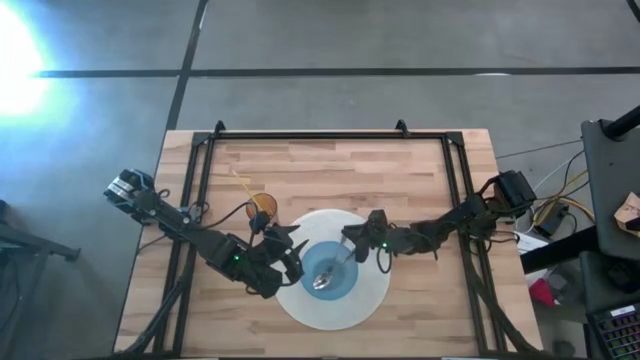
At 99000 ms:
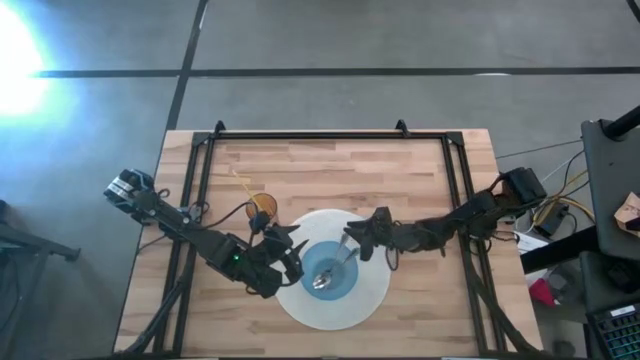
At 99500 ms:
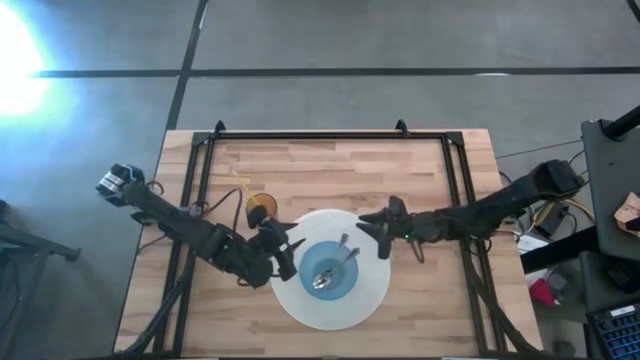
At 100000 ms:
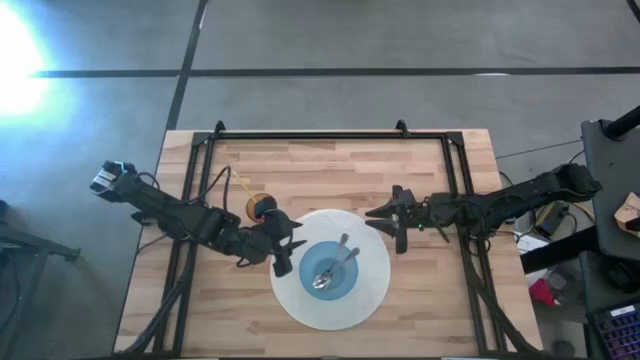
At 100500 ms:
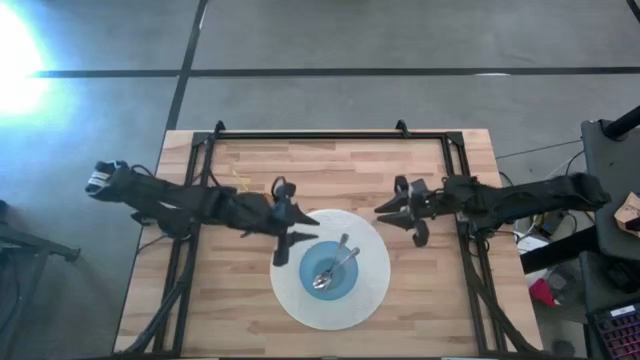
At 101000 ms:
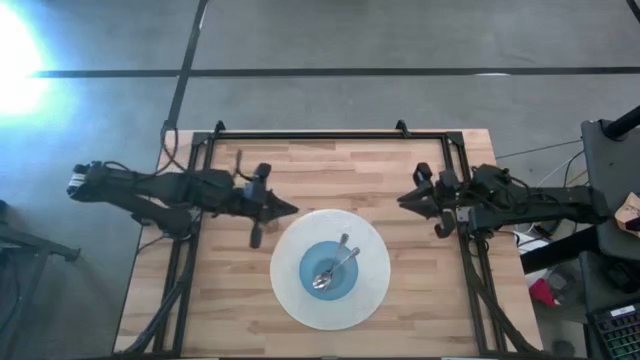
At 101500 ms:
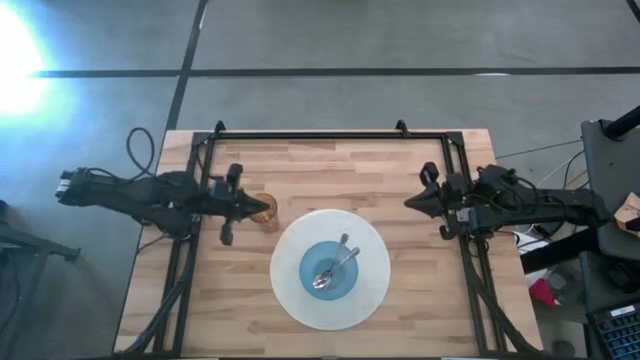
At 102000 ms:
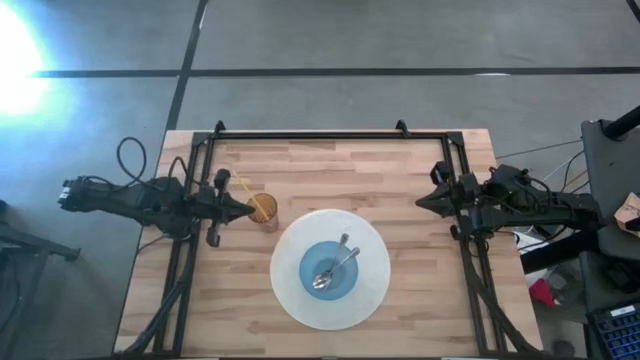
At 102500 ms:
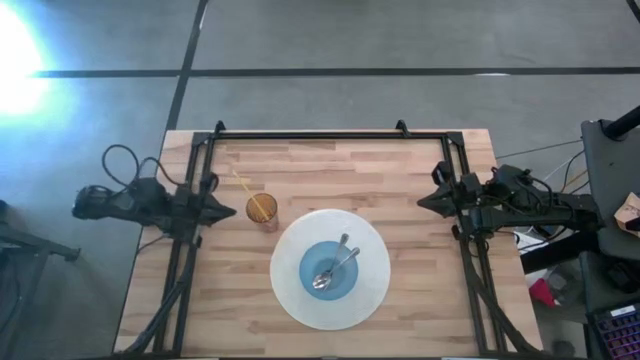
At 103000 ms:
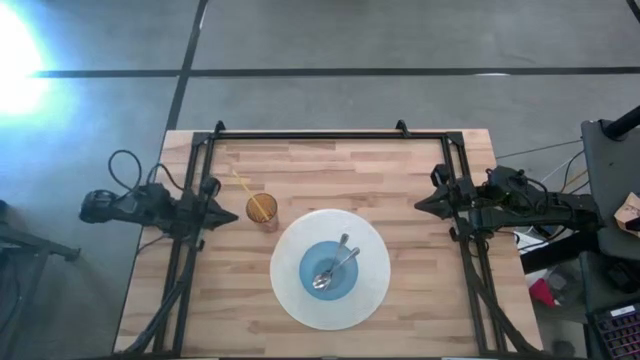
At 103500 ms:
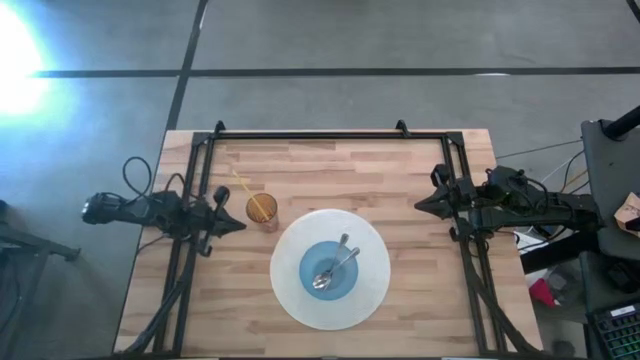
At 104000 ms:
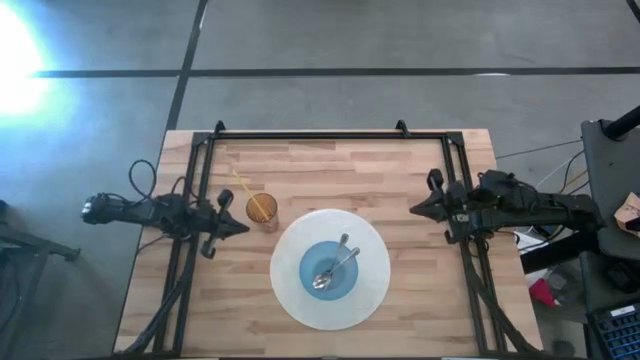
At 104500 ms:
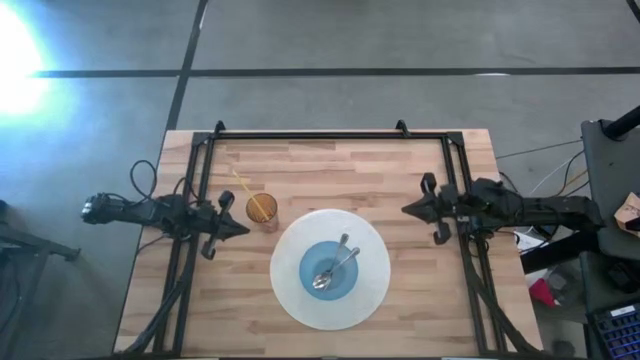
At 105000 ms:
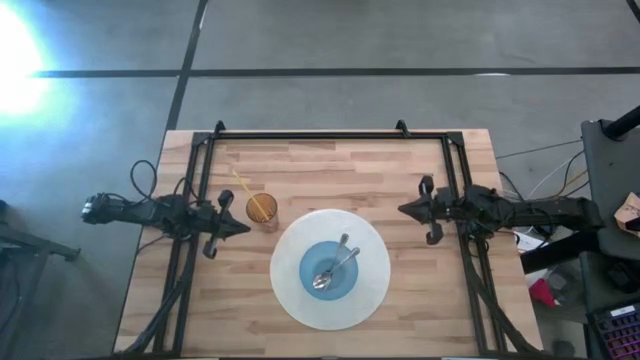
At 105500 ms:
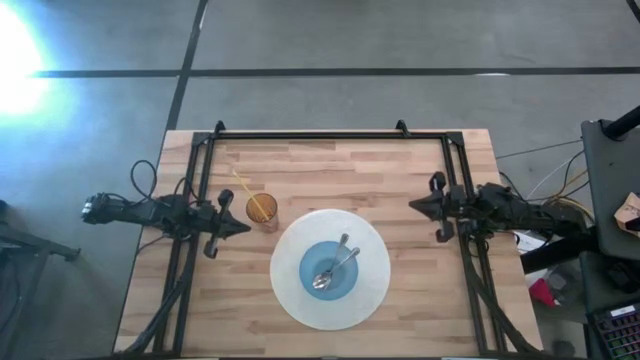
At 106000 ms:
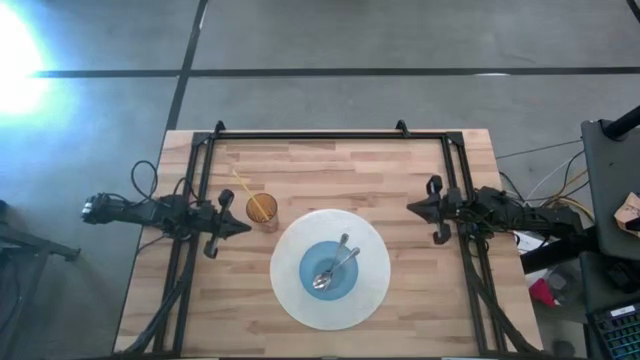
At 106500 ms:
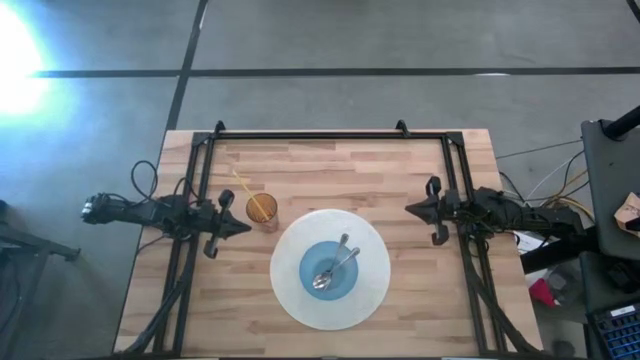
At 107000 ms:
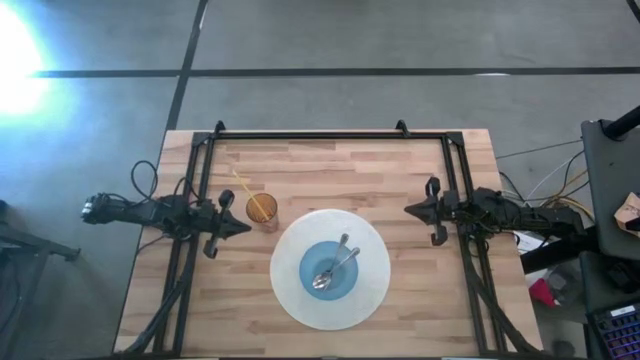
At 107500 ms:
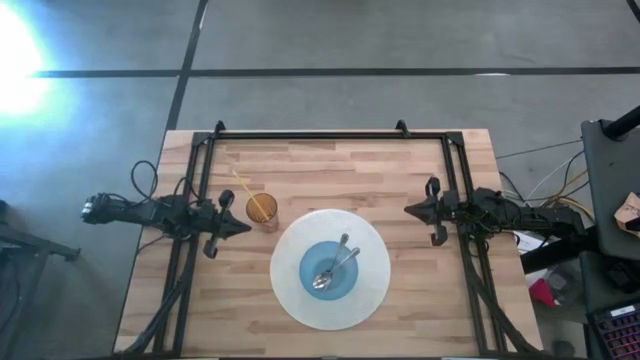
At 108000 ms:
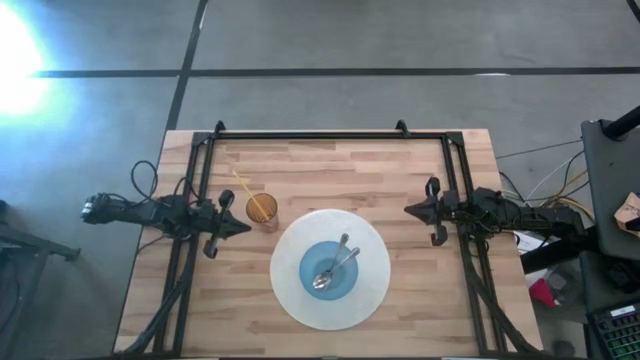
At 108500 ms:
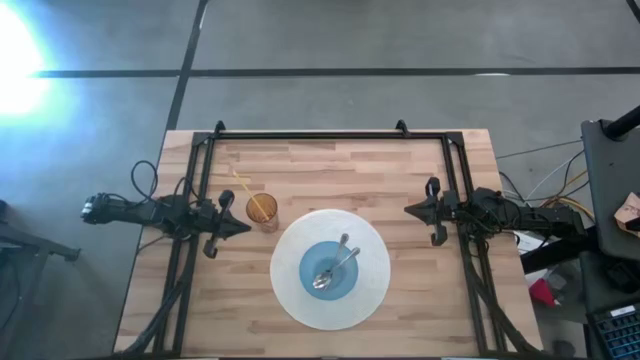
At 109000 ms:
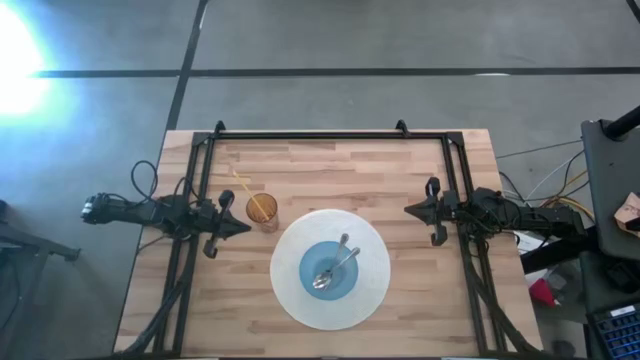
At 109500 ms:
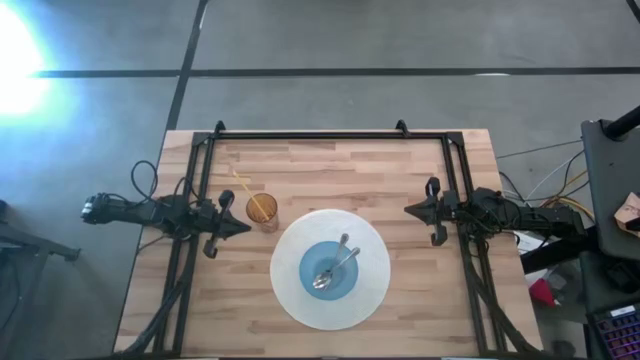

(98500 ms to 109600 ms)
Task: Pick & Place Utensil
Return to Home Position

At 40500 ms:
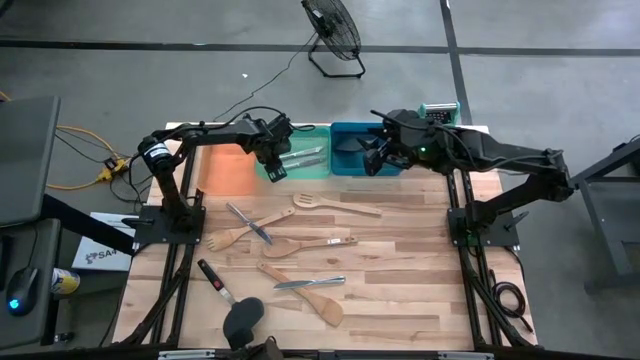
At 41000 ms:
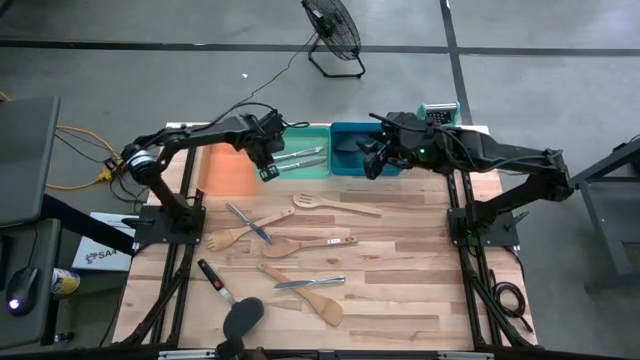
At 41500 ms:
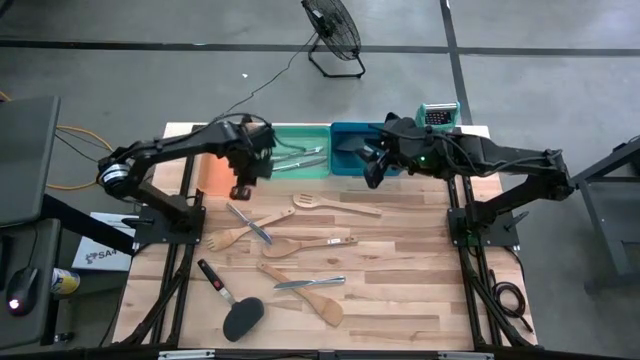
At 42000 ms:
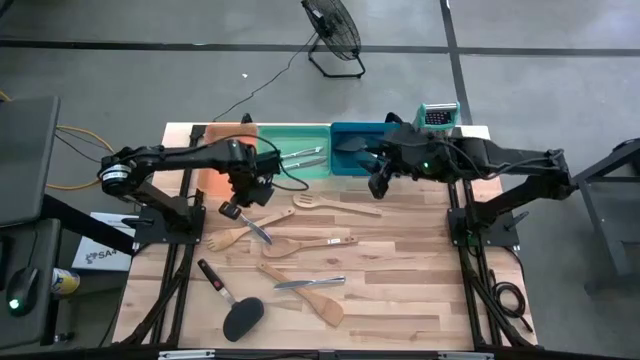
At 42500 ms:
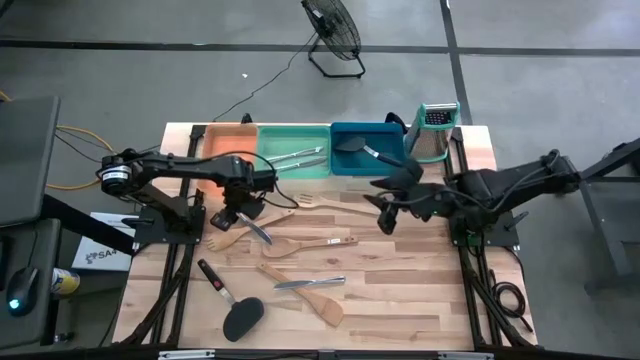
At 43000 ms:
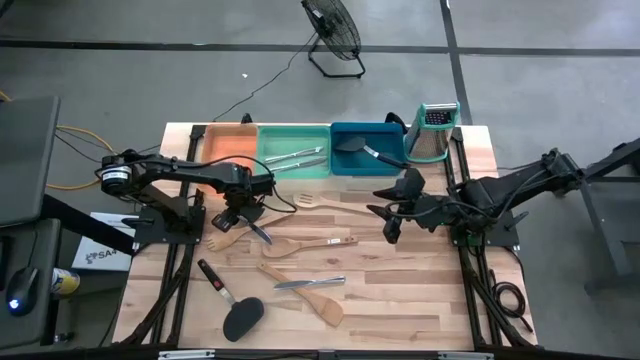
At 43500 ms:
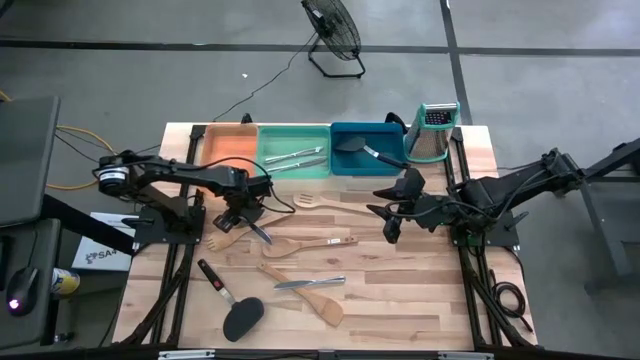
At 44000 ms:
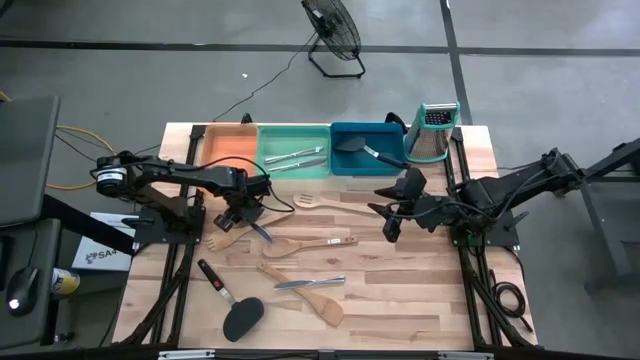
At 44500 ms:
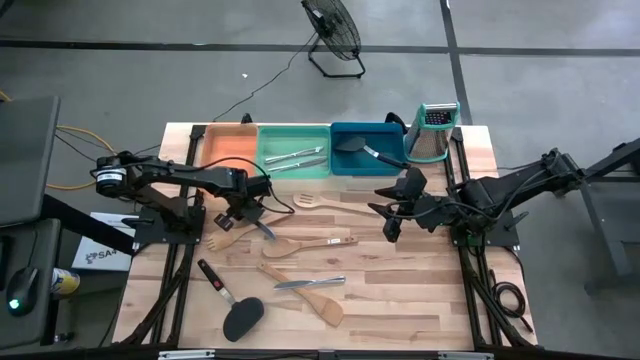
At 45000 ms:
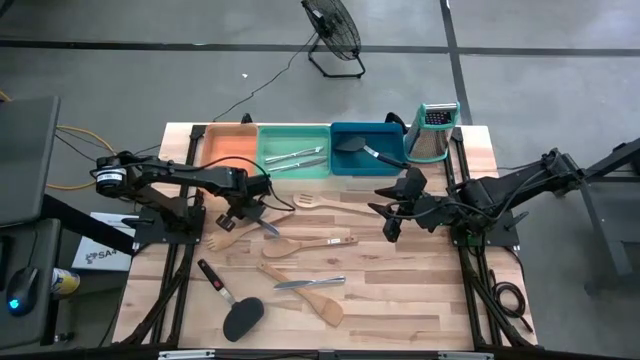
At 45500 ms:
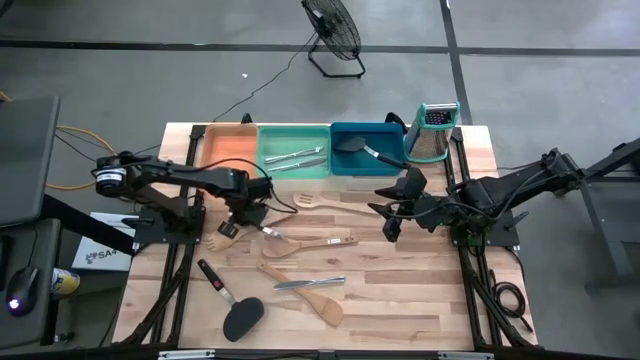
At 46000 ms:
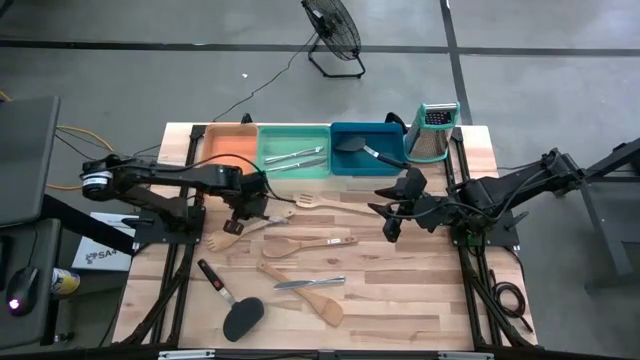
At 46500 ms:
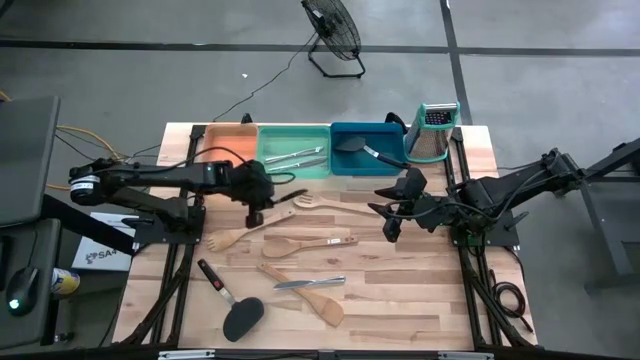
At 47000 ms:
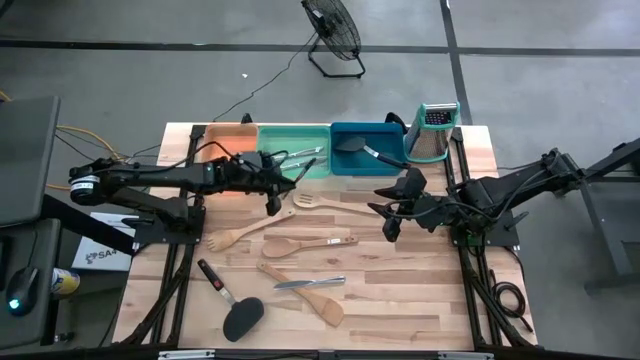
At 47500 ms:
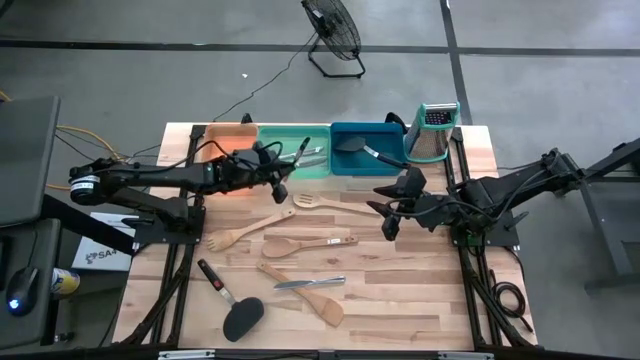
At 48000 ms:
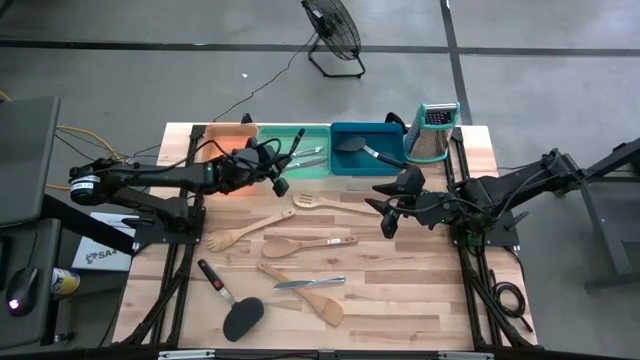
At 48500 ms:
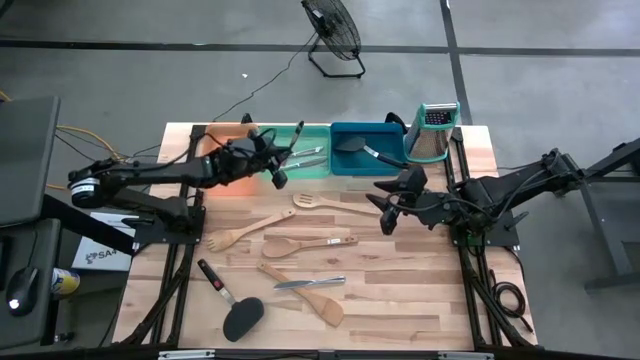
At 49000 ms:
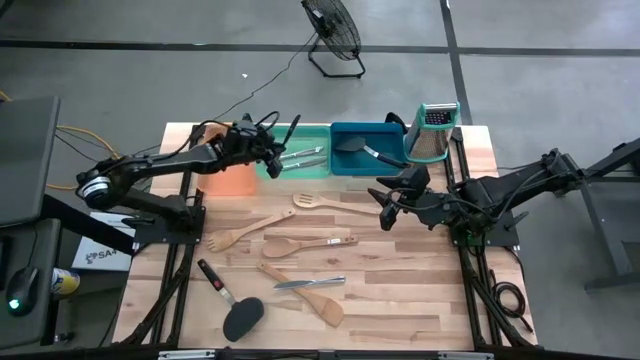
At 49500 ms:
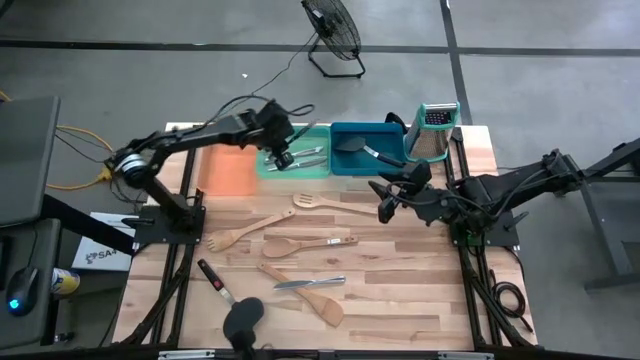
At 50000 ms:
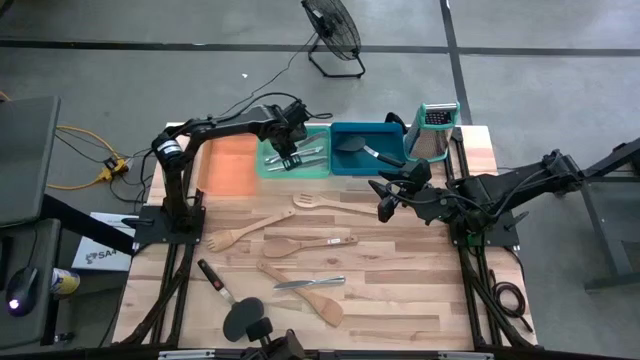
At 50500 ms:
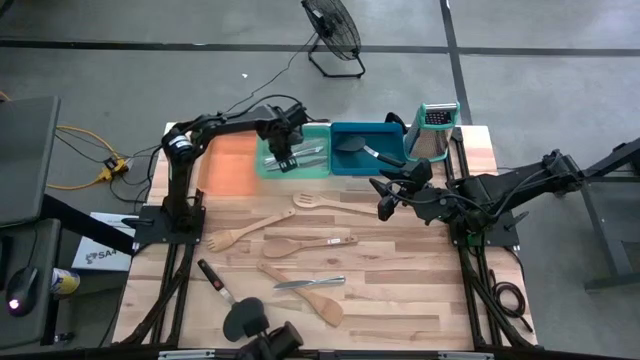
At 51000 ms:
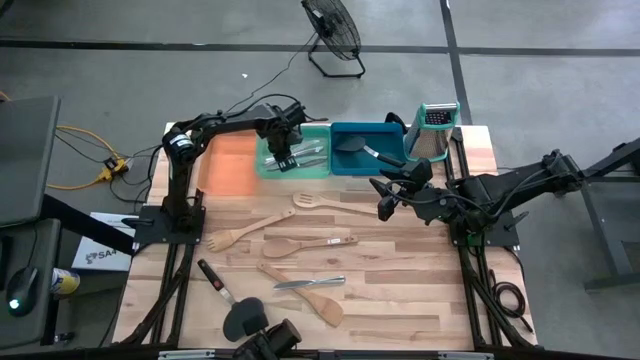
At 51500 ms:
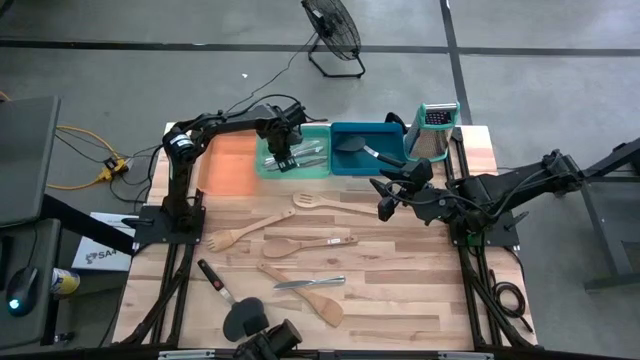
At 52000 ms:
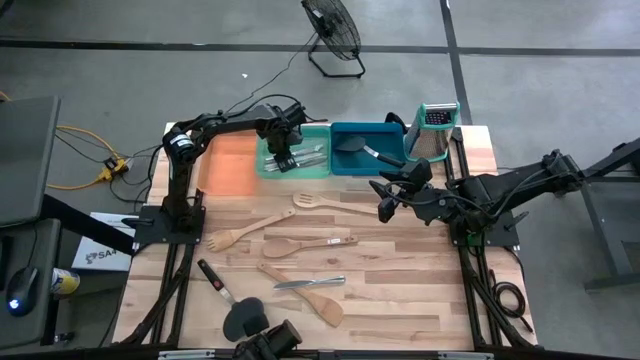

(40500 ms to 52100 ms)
Task: Pick & Place Kitchen Items
Put the silver table knife into the green bin
